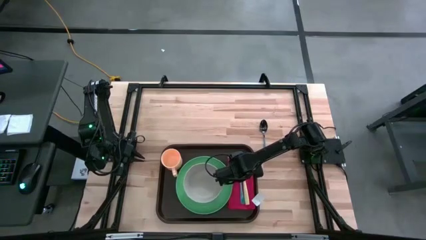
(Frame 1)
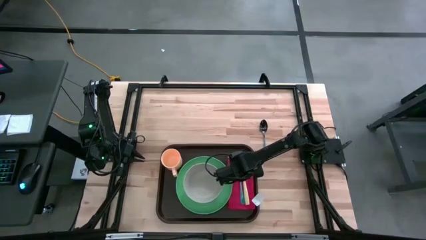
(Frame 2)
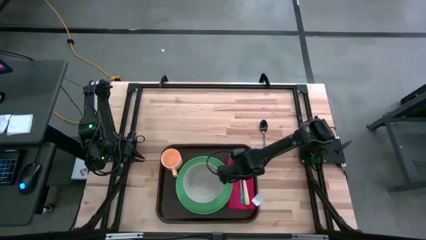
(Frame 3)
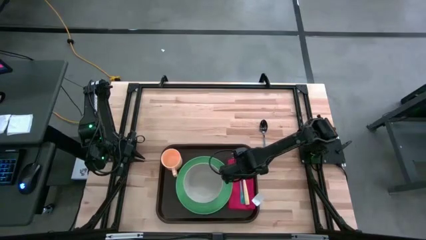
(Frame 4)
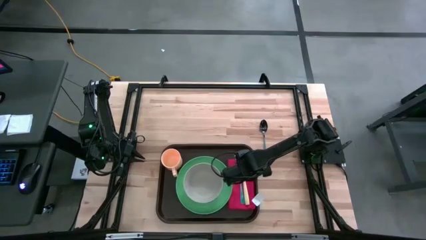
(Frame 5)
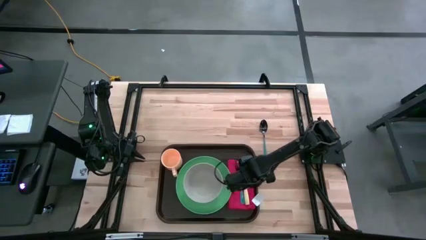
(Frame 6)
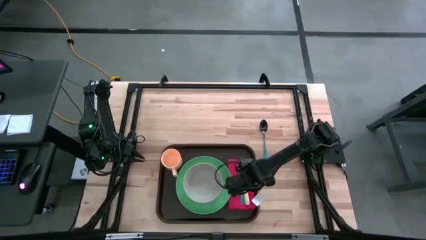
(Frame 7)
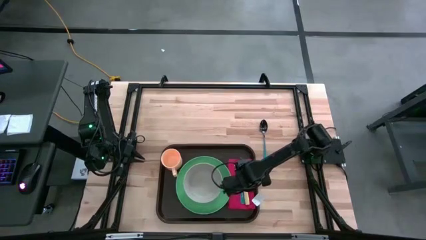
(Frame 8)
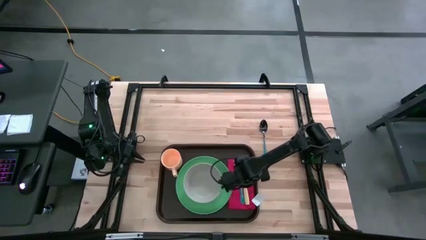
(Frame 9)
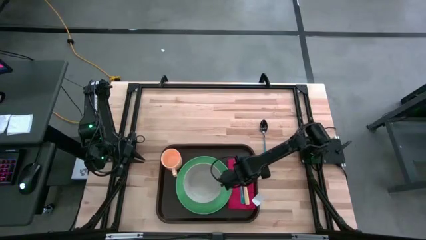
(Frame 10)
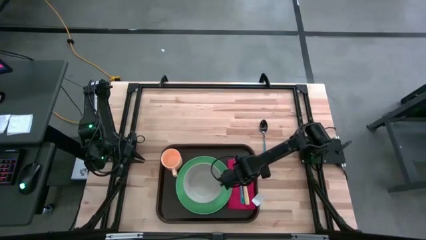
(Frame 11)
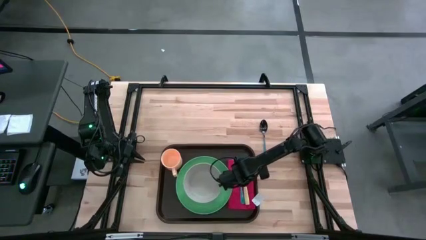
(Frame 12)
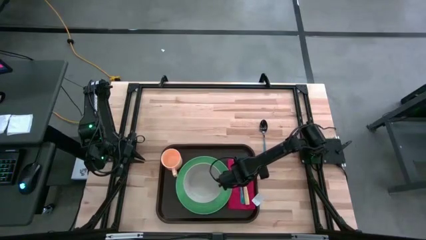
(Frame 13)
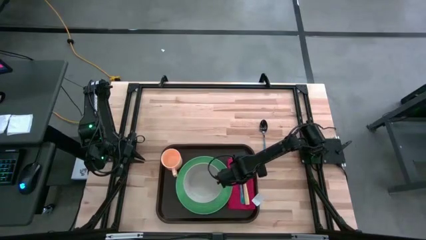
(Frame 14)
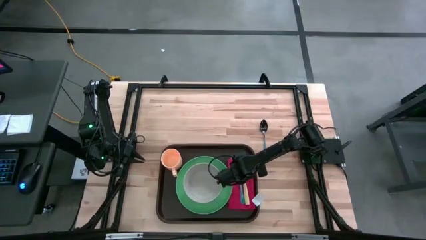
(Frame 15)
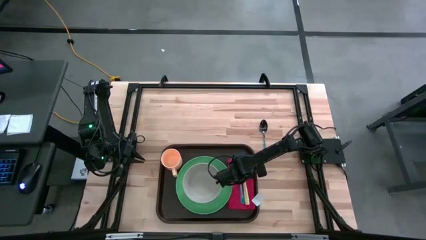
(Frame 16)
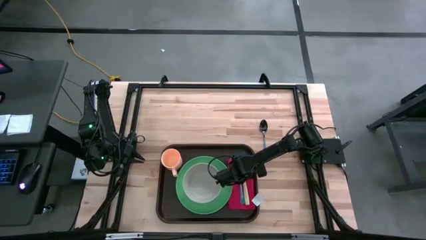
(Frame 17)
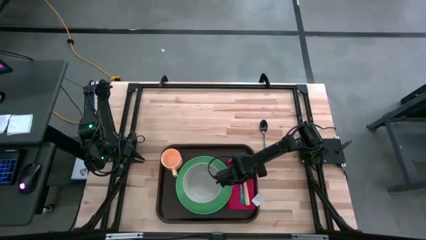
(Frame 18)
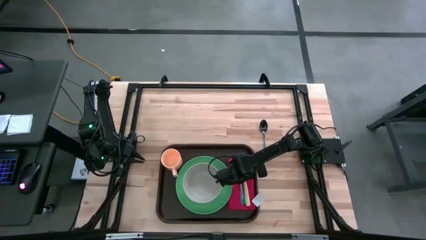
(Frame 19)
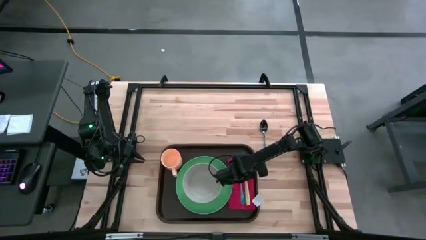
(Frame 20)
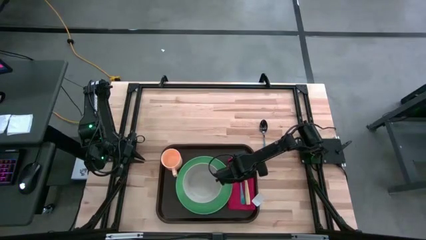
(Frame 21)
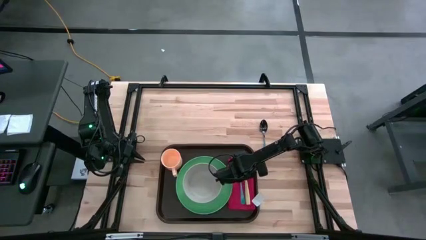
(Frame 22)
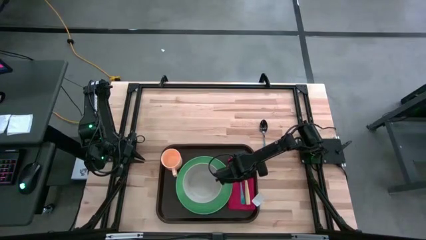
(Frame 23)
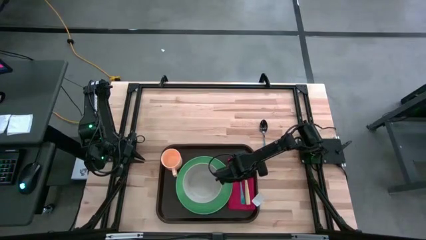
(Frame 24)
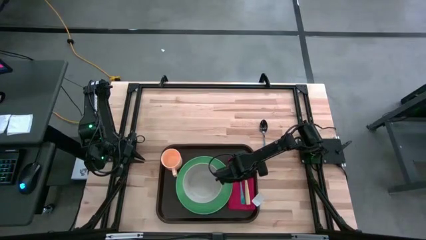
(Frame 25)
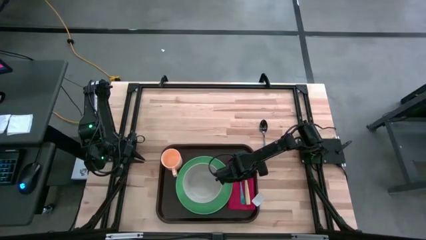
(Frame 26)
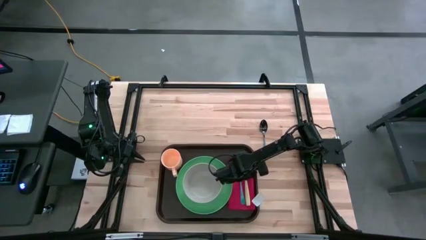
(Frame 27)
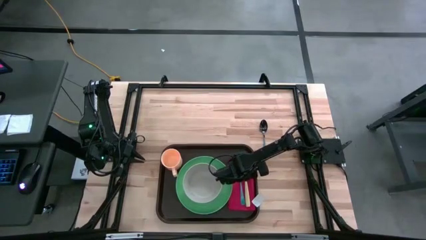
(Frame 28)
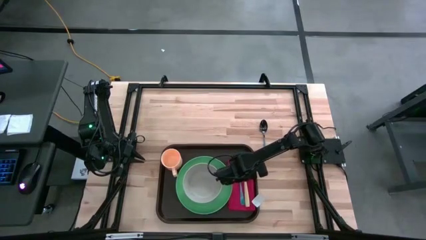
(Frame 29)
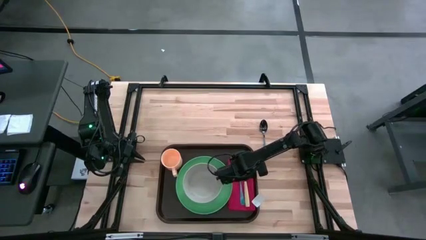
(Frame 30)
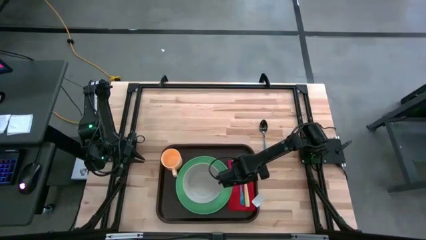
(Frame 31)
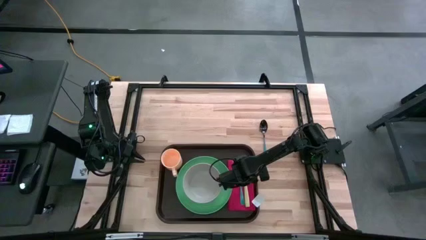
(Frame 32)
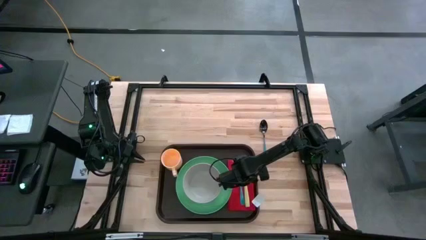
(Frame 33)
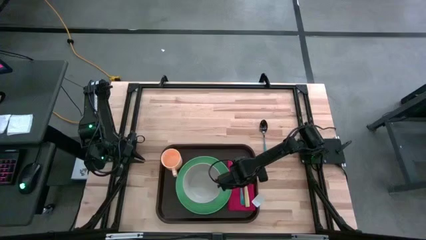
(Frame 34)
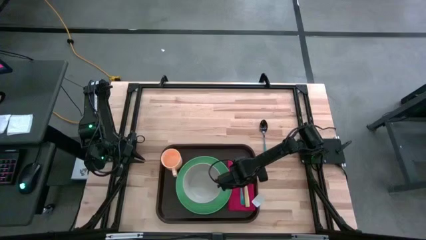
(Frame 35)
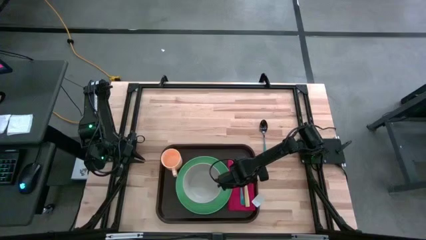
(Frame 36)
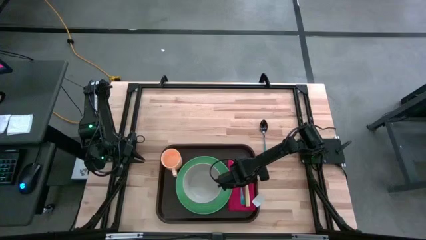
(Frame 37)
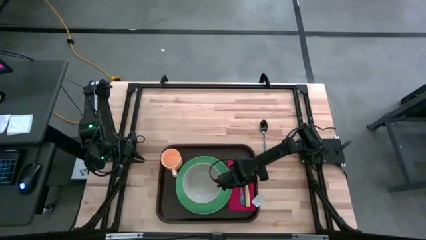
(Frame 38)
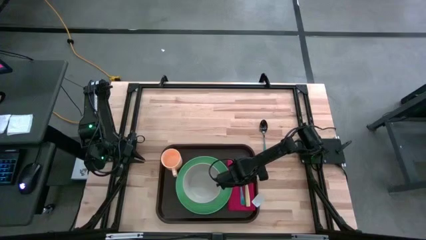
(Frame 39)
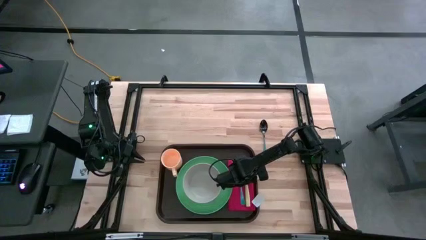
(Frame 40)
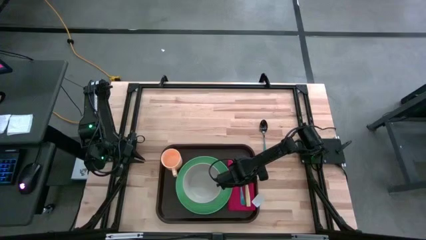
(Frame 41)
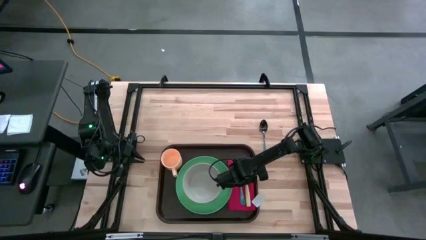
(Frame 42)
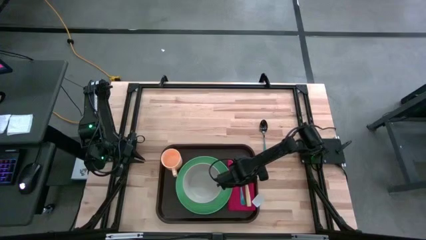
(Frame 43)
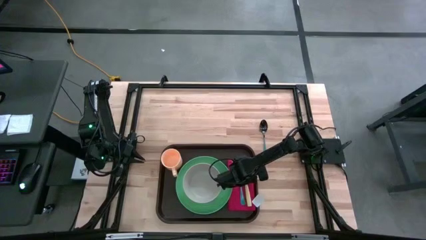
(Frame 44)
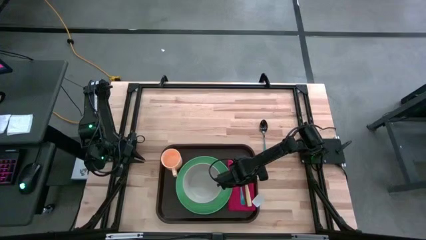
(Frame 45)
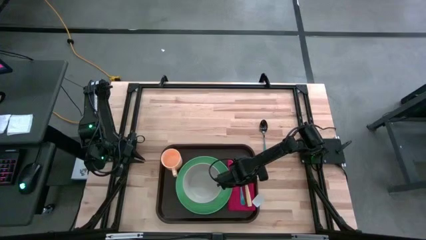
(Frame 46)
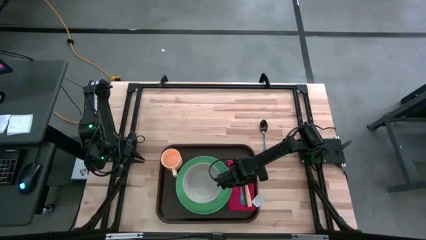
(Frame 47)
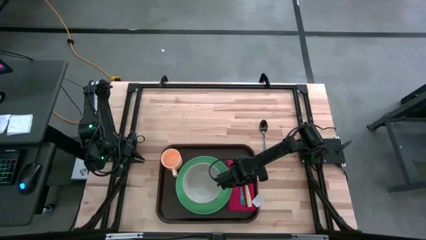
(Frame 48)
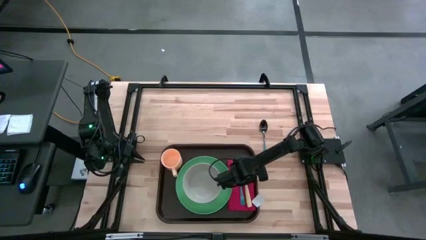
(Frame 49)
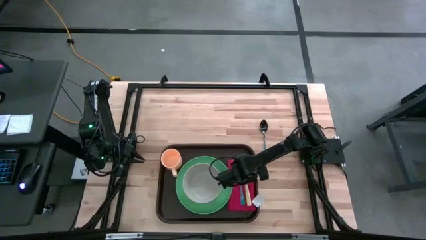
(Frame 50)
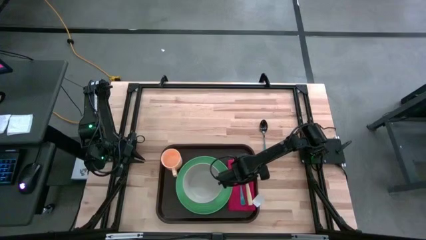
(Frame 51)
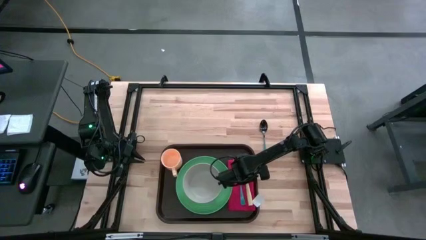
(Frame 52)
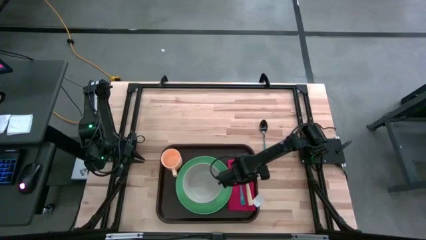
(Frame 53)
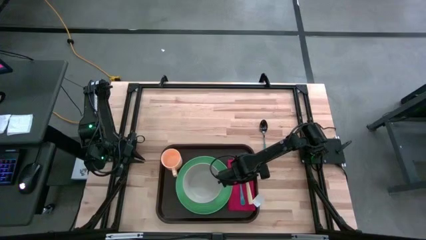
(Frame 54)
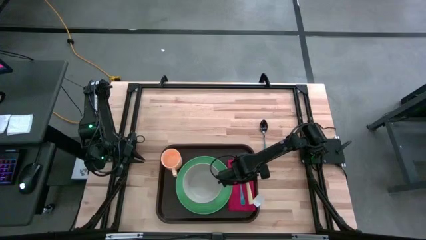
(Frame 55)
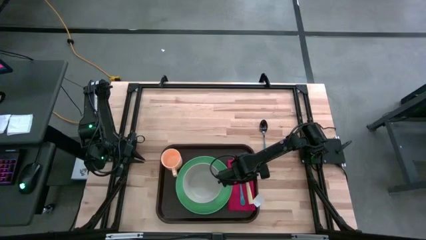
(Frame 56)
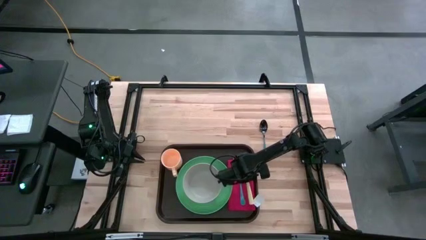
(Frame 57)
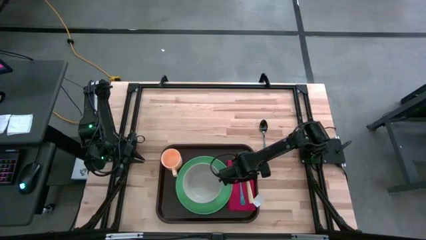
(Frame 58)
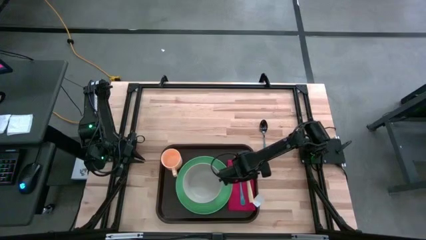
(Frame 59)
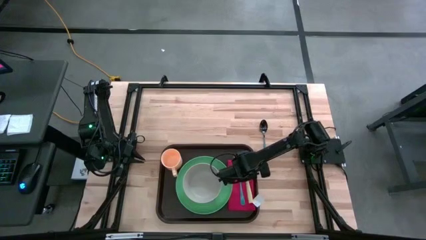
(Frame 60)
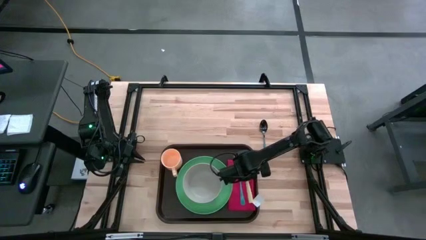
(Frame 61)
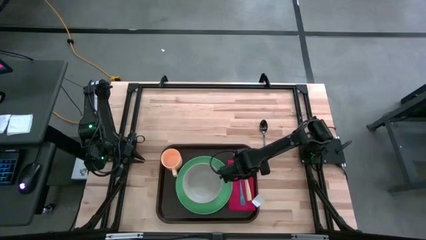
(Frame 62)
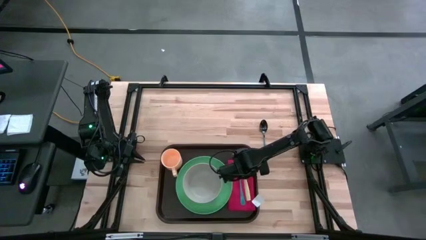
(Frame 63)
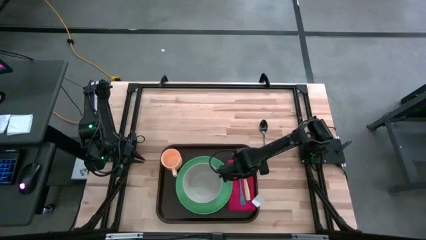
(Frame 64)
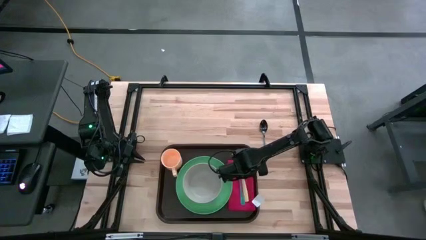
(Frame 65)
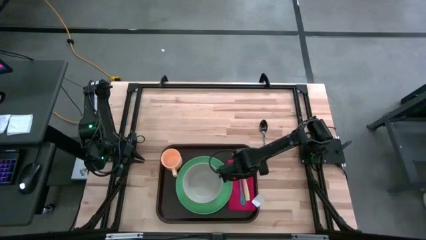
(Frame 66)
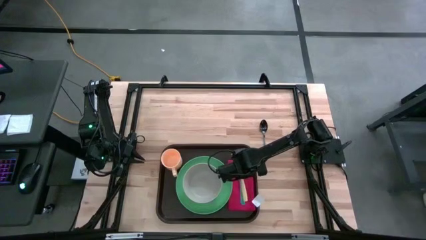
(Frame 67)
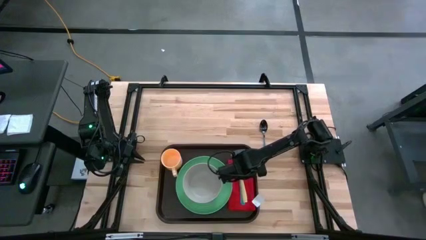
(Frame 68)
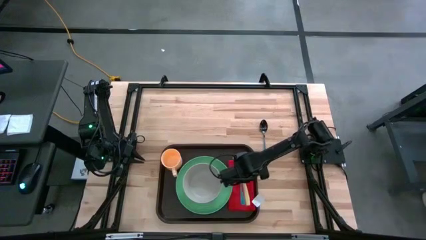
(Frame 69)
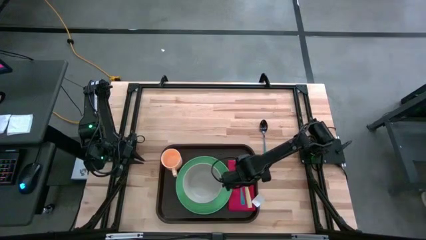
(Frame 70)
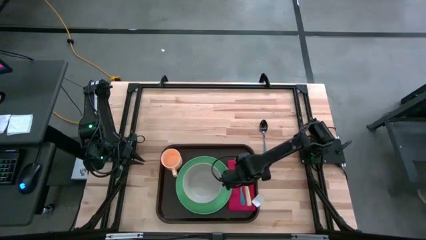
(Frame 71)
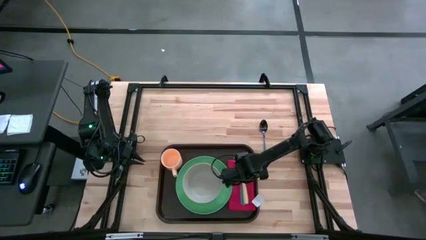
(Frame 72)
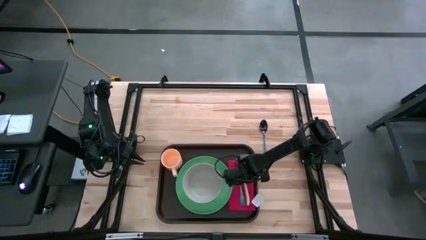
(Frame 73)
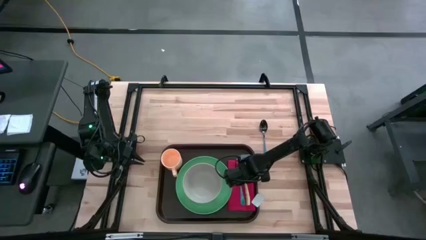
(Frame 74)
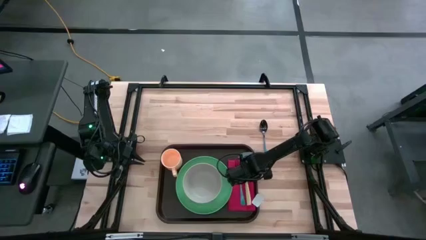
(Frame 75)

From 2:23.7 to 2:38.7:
Task: Set up tray
Adjust the yellow knife on the red napkin

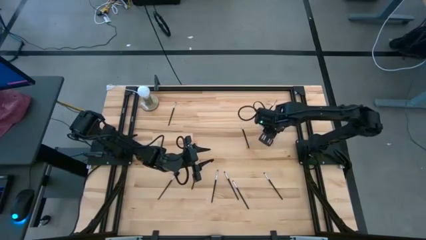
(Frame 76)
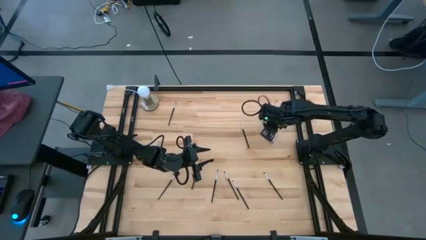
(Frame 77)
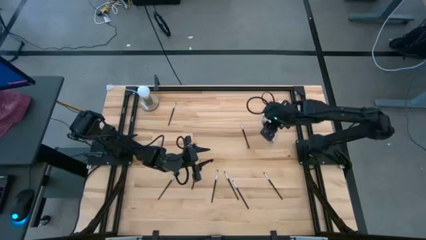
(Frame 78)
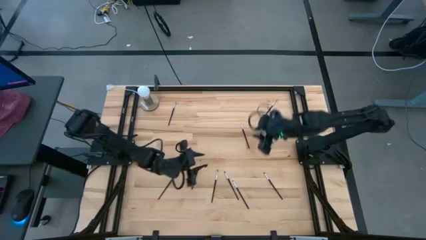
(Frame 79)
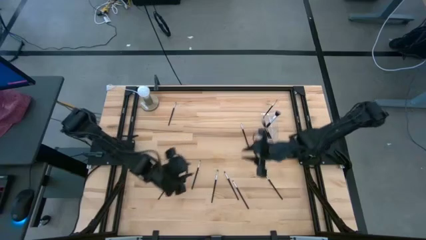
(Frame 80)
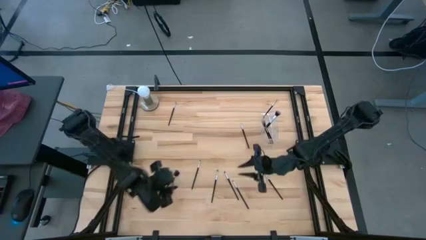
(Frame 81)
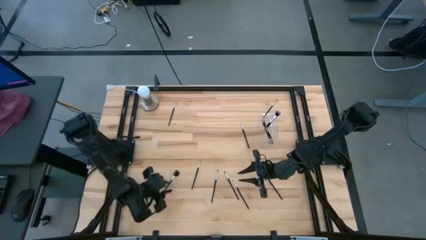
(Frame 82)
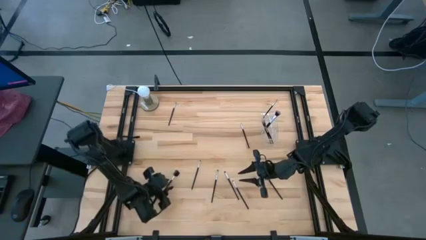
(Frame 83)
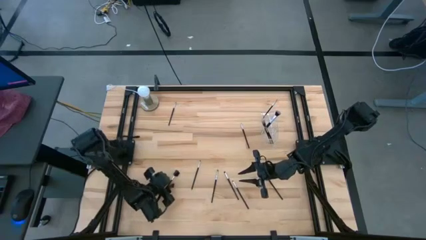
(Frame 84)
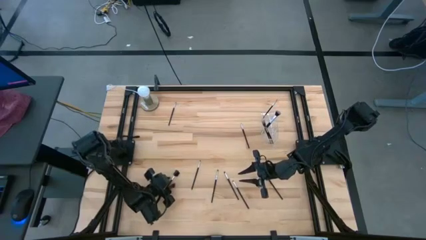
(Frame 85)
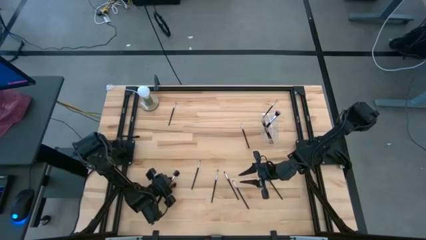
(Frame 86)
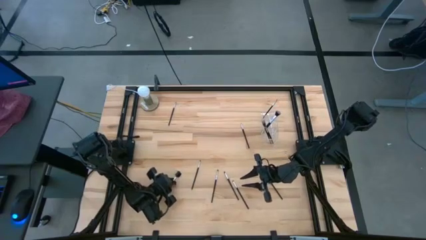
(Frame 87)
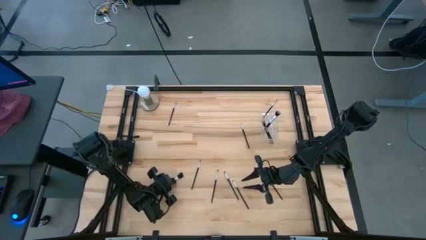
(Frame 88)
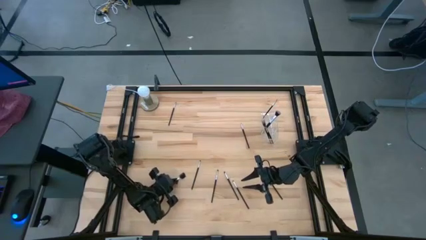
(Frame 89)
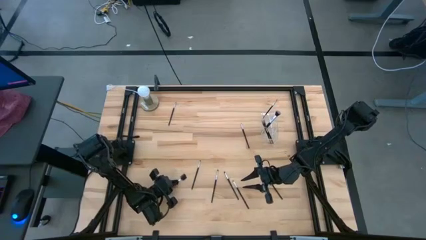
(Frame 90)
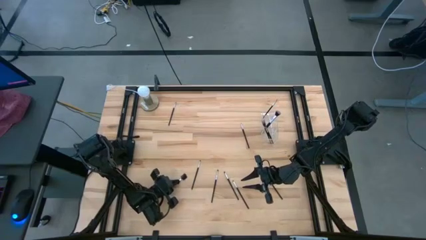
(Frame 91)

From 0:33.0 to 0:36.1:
Task: Sort items
Put the silver lash/brow brush into the transparent organizer
